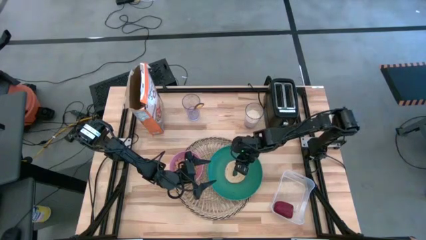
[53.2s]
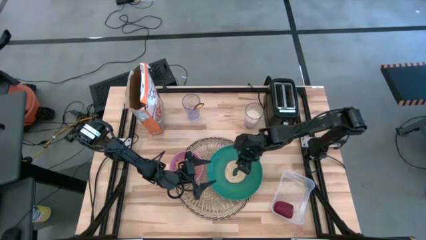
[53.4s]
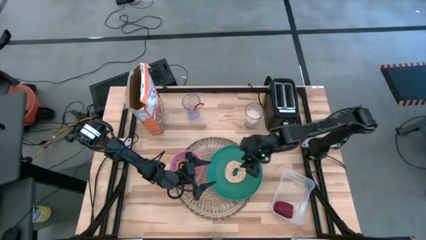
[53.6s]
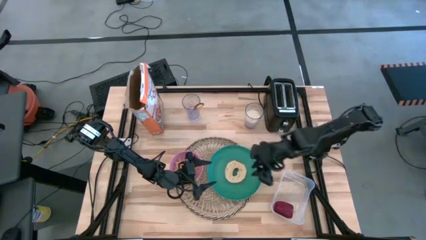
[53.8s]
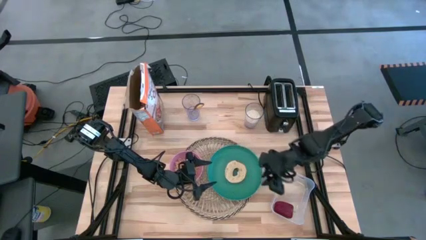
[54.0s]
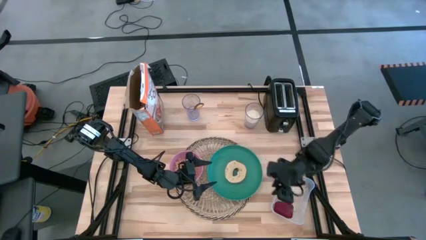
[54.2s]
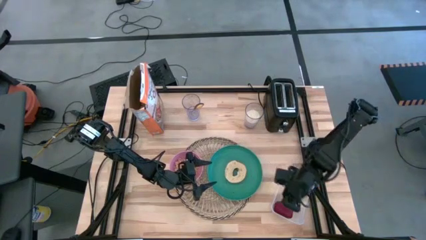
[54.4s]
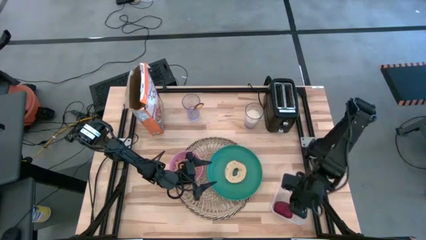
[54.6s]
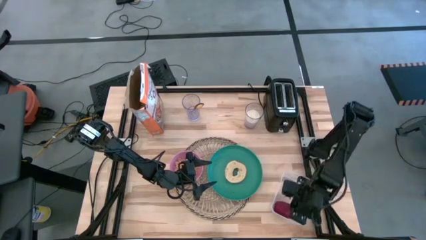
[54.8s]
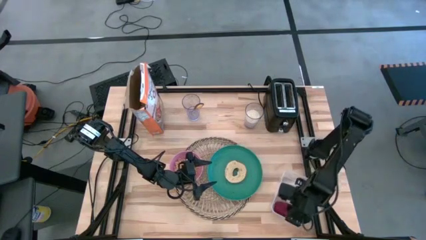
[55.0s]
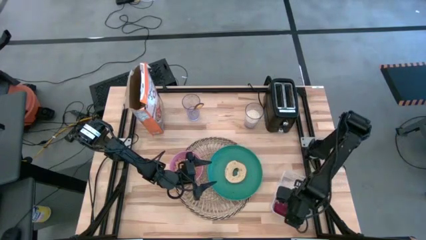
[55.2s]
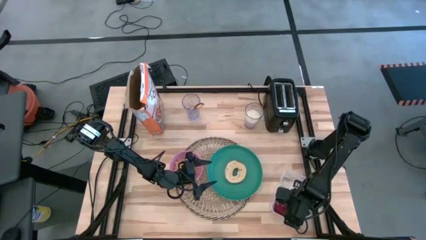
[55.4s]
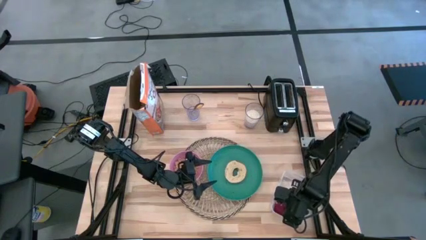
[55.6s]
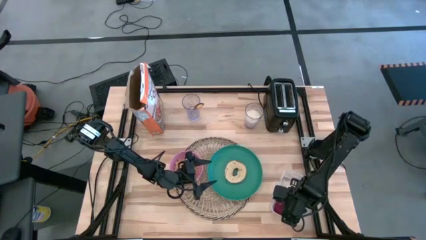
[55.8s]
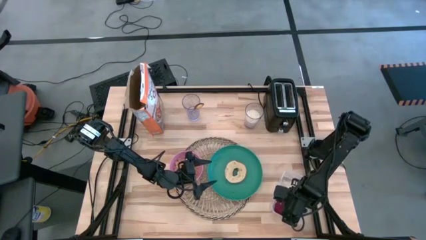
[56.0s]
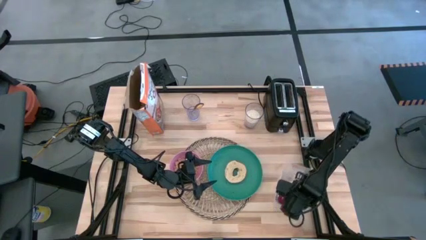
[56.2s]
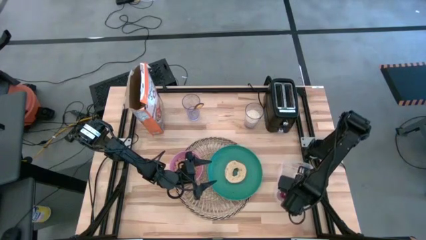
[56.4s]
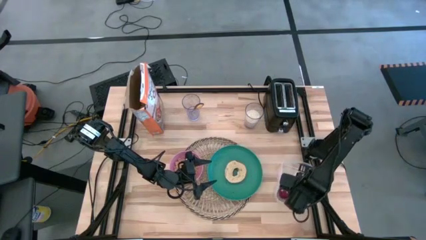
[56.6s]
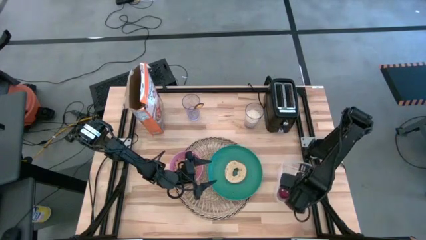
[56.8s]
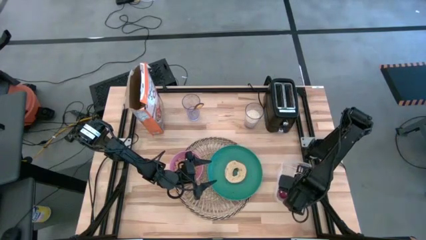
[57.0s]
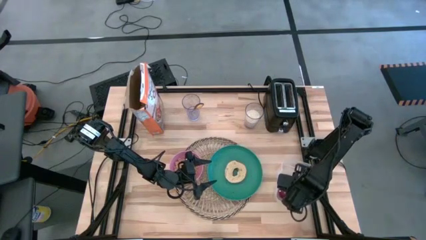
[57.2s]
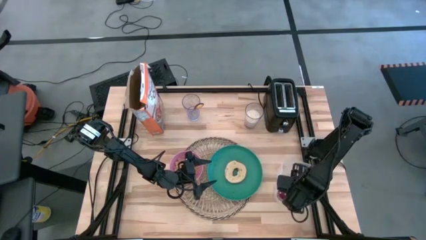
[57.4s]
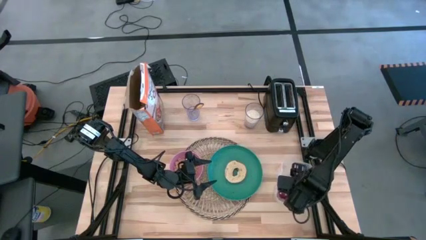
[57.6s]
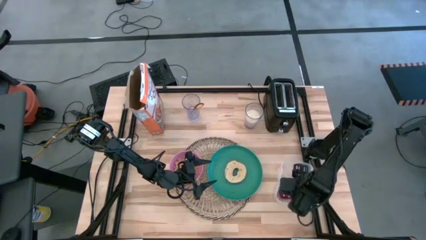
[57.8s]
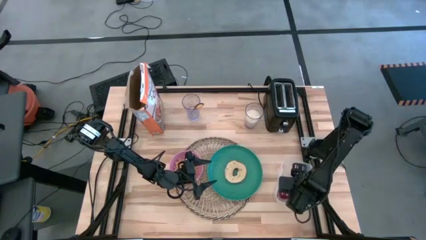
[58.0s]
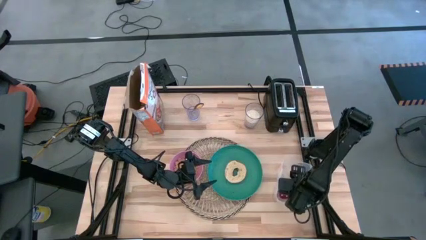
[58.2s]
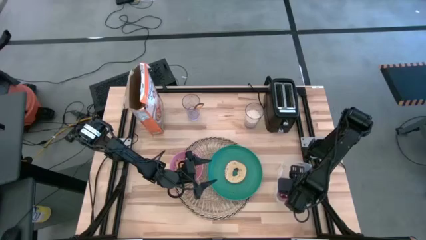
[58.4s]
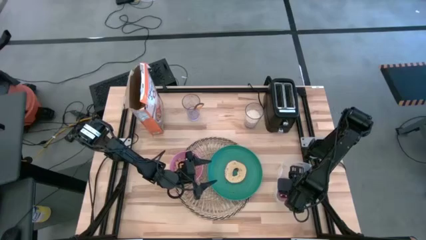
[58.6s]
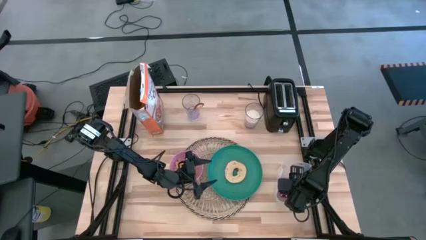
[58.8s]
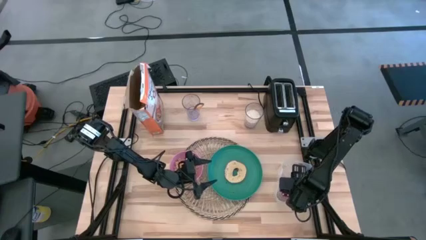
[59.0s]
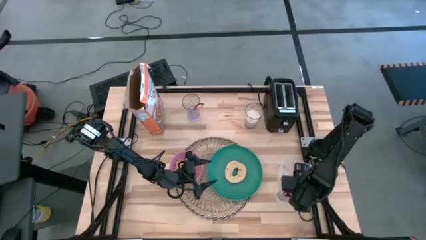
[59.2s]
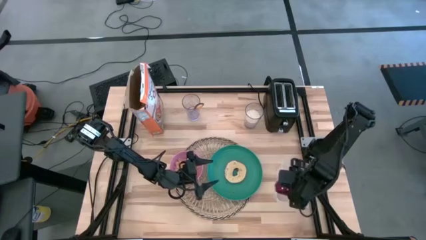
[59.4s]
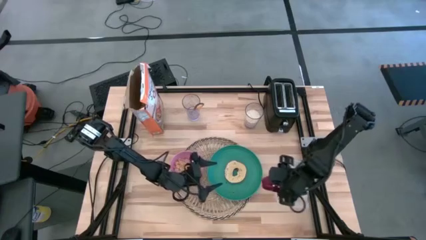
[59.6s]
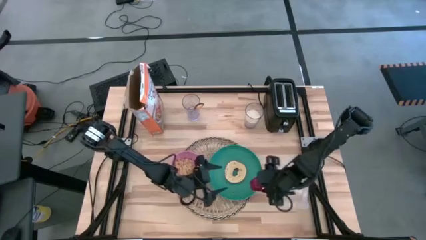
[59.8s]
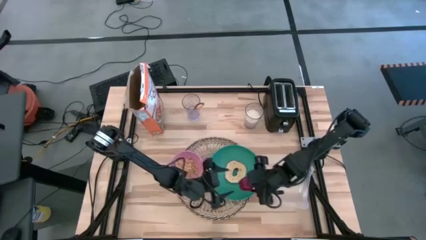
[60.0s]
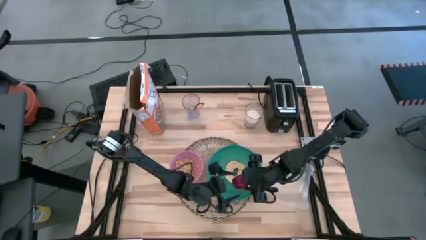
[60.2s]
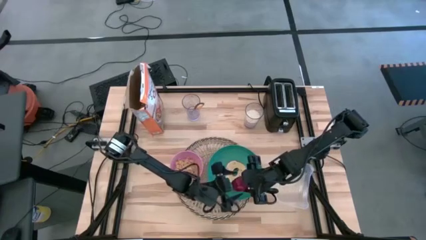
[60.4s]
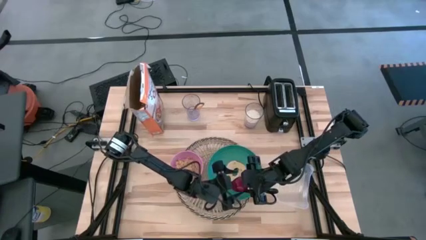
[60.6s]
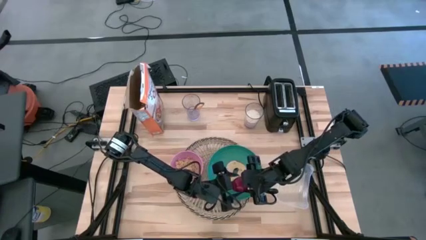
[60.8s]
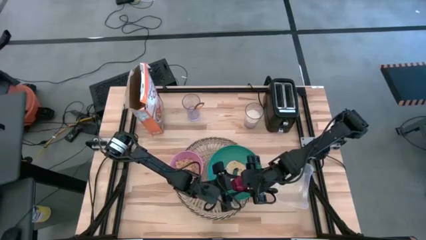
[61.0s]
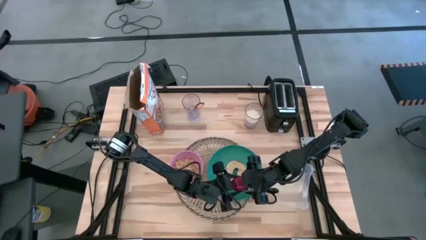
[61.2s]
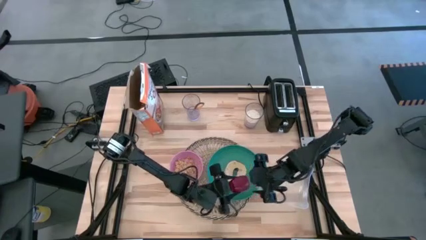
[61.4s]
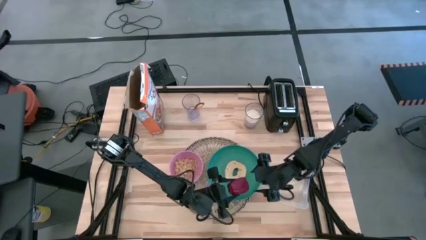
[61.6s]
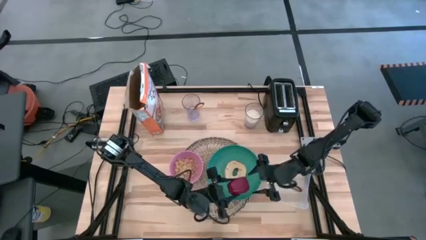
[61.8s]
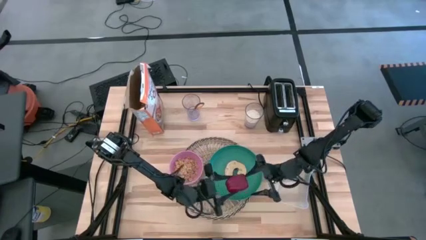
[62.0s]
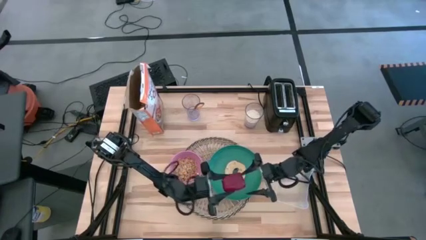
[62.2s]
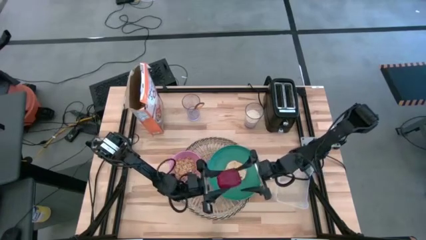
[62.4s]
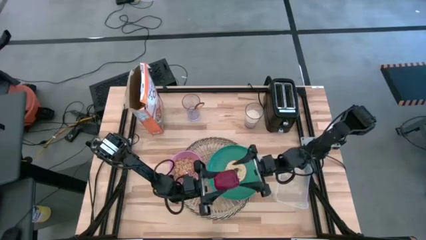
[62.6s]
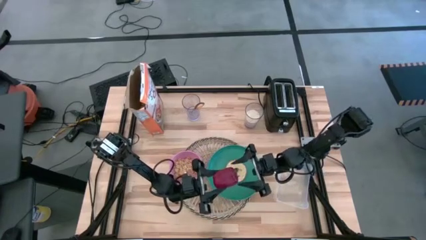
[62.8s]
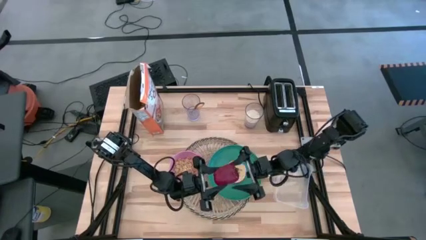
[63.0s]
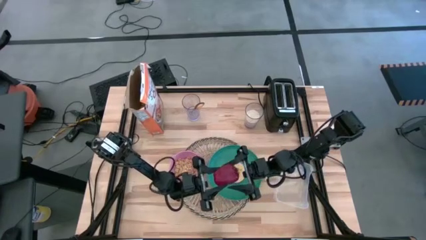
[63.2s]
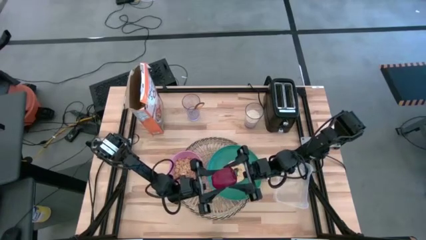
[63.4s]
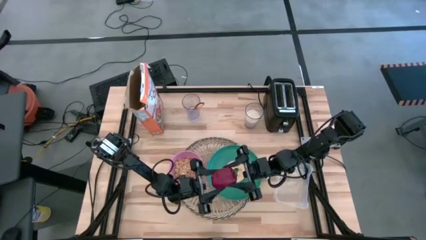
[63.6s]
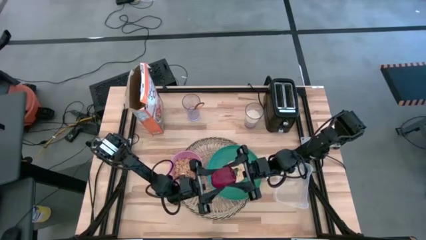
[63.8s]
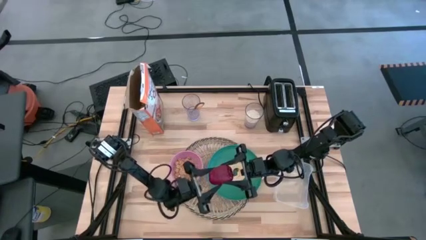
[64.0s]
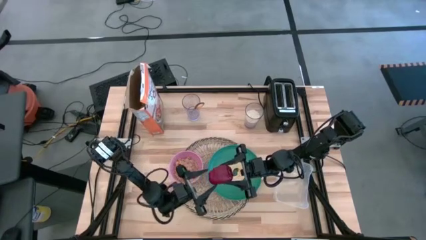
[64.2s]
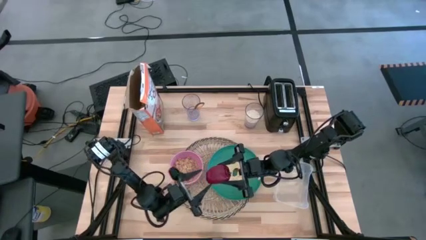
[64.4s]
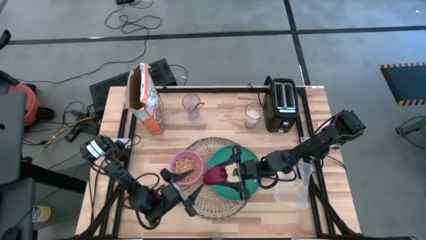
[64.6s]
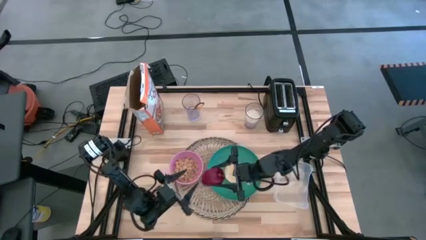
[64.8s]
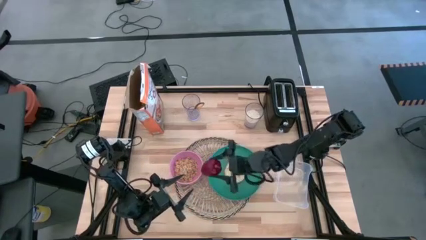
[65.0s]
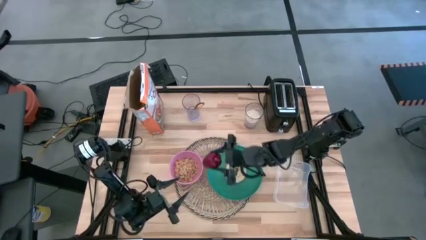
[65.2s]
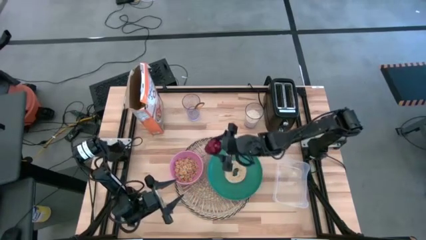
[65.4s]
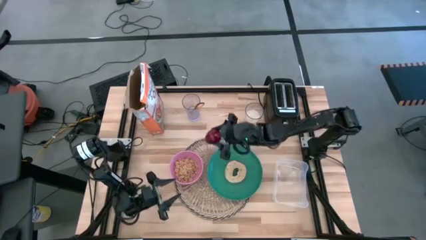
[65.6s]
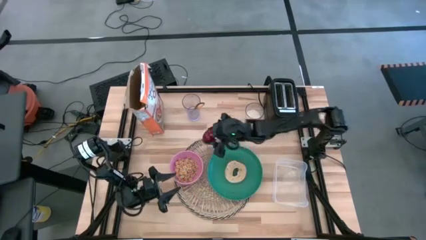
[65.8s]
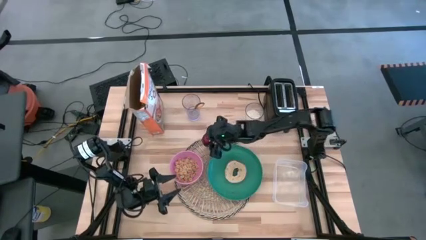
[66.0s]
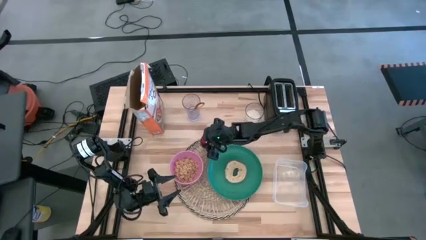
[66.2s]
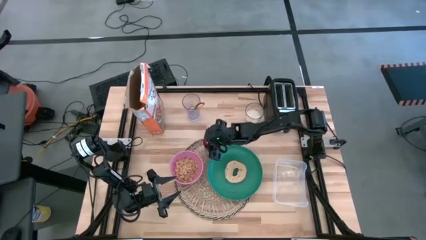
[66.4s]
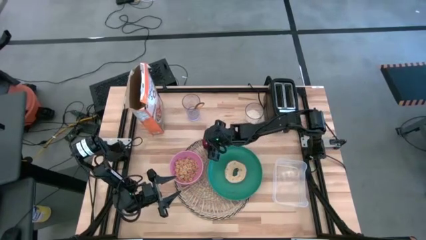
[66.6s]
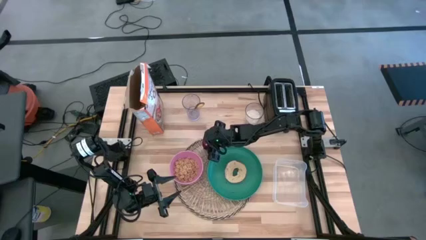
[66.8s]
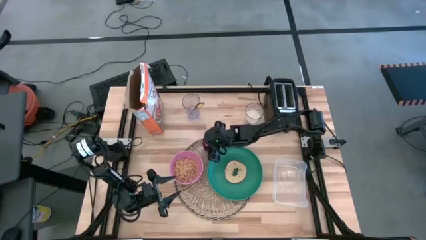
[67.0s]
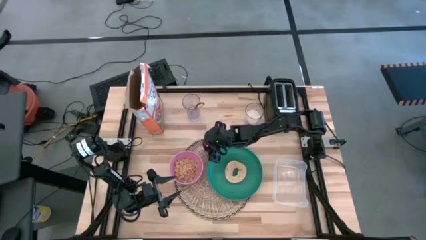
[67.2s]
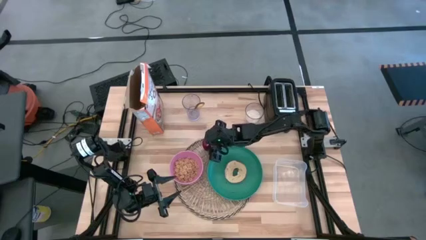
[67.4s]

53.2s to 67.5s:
Task: Arrange a breakfast setting
Put the red apple on the placemat to the top left of the green plate

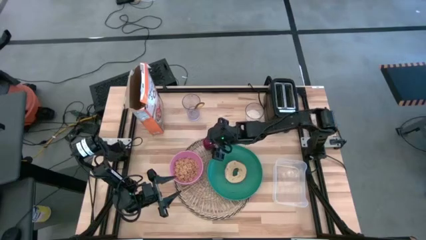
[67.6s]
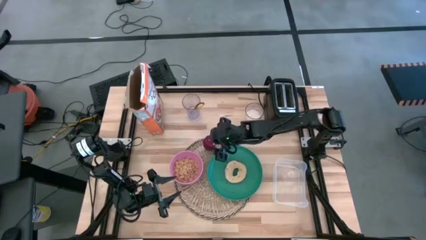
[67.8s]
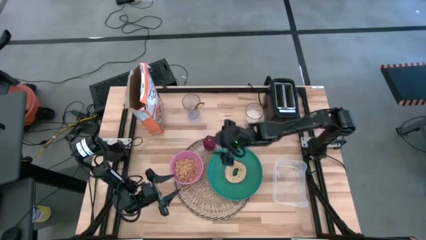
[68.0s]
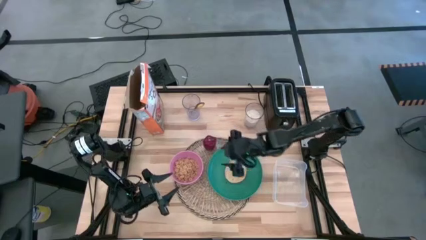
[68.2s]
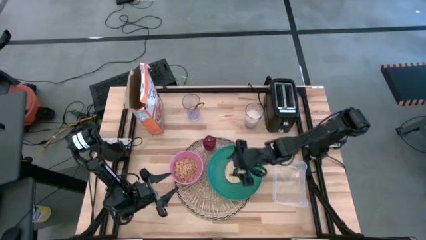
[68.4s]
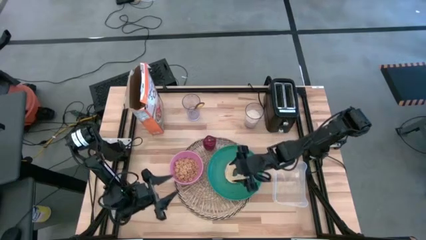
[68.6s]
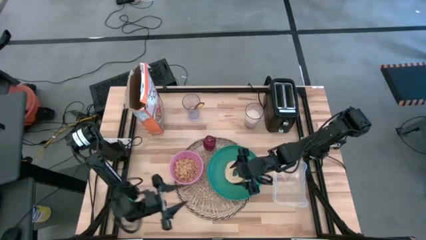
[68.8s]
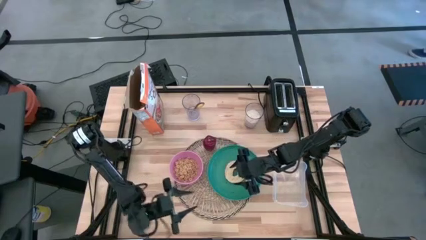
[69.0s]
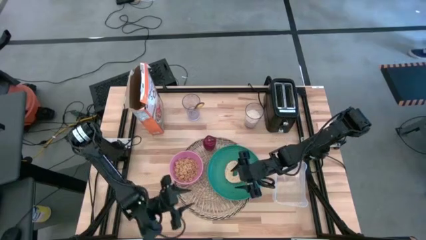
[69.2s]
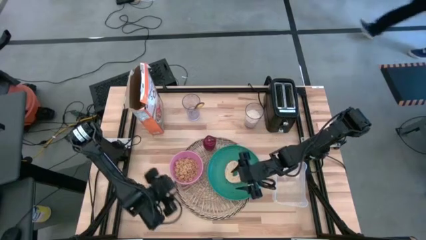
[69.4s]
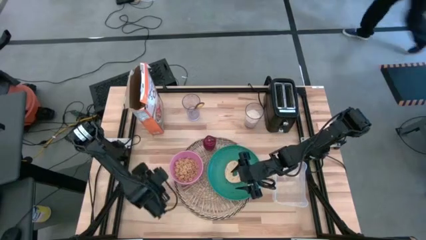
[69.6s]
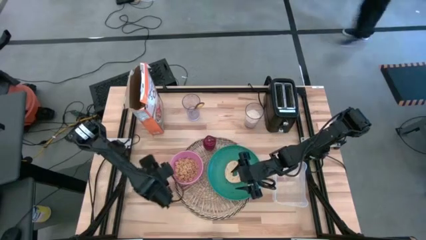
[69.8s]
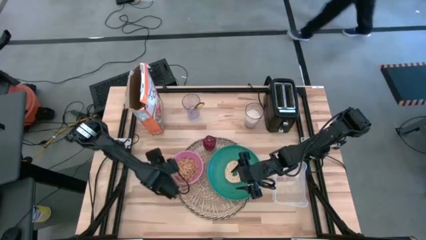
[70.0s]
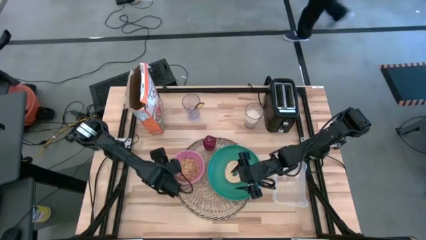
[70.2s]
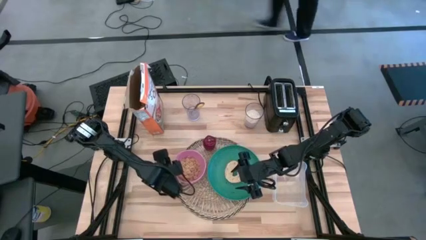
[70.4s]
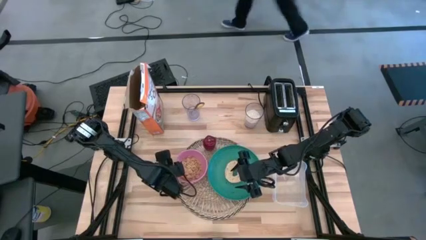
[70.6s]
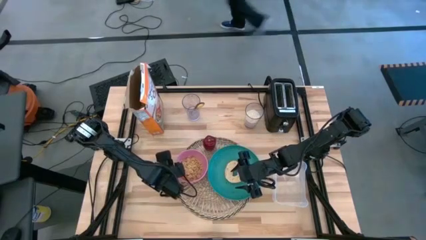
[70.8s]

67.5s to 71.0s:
Adjust the pink bowl
